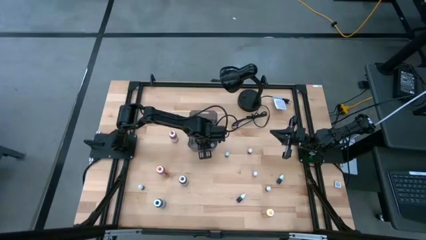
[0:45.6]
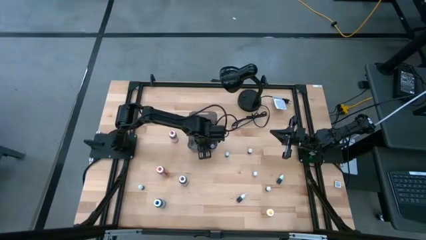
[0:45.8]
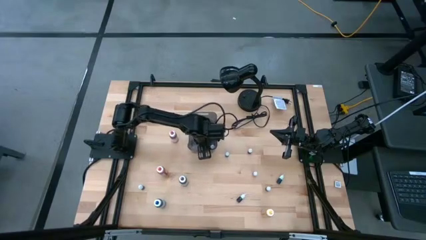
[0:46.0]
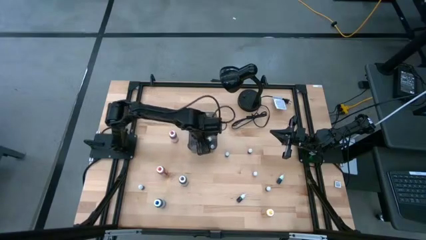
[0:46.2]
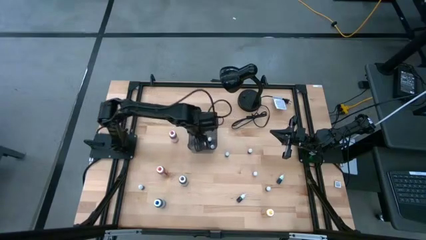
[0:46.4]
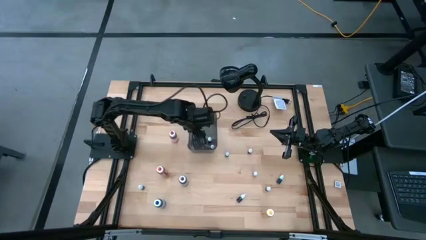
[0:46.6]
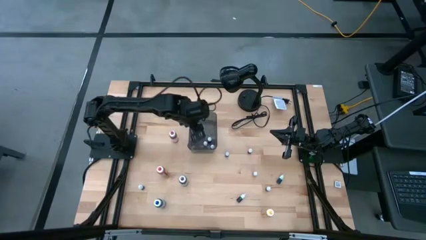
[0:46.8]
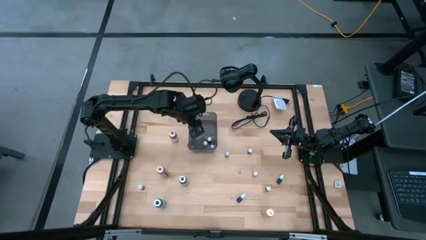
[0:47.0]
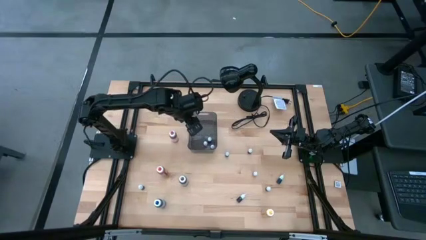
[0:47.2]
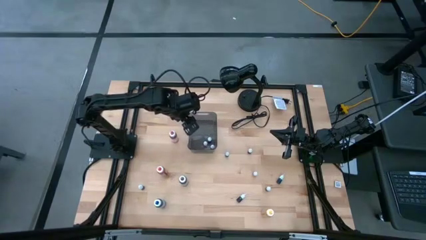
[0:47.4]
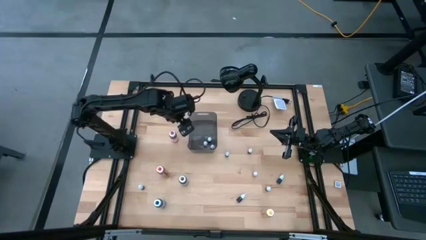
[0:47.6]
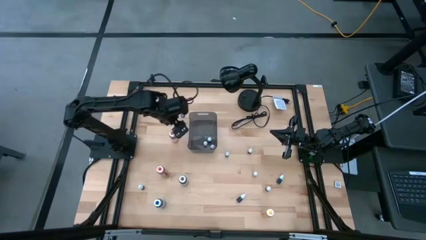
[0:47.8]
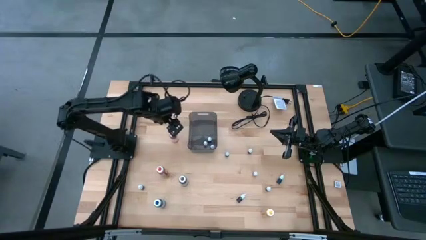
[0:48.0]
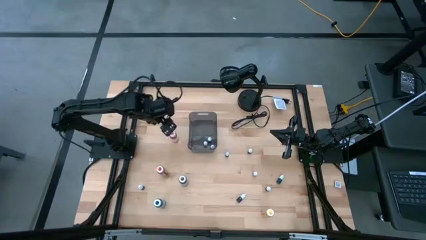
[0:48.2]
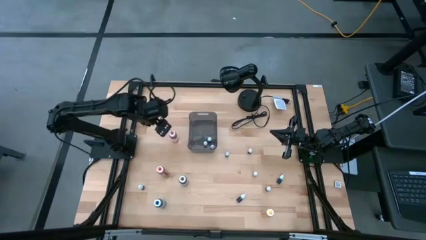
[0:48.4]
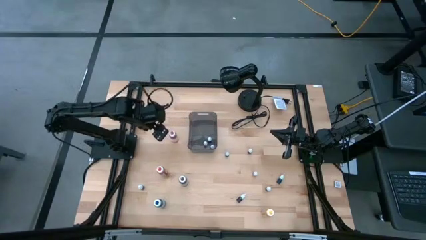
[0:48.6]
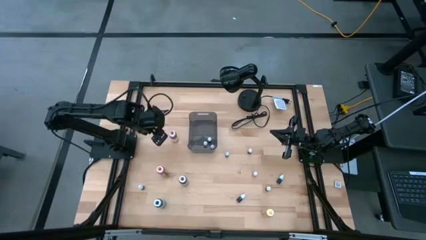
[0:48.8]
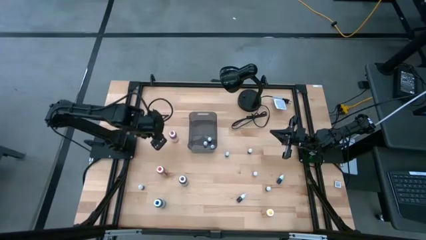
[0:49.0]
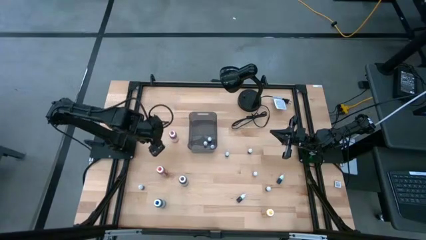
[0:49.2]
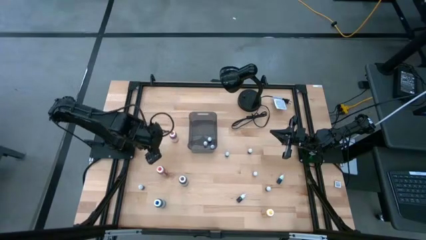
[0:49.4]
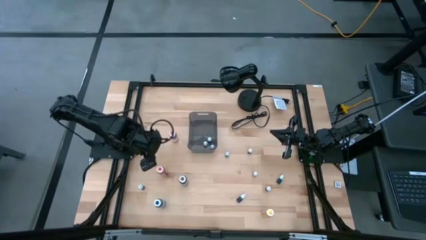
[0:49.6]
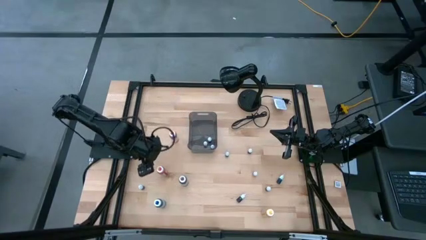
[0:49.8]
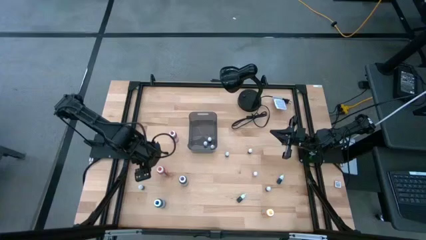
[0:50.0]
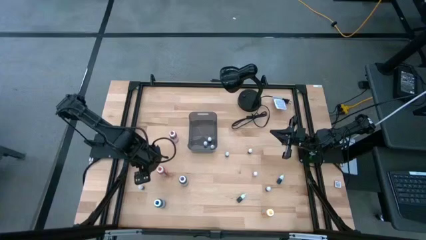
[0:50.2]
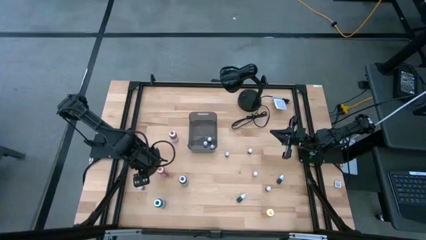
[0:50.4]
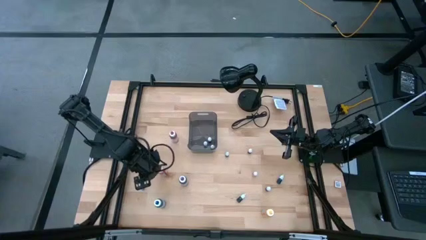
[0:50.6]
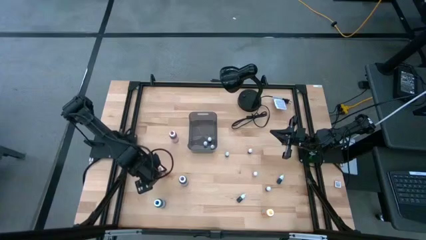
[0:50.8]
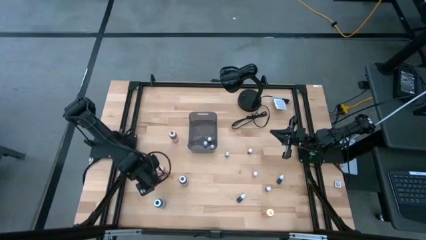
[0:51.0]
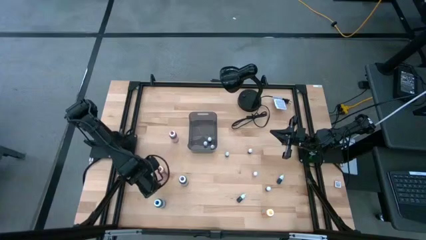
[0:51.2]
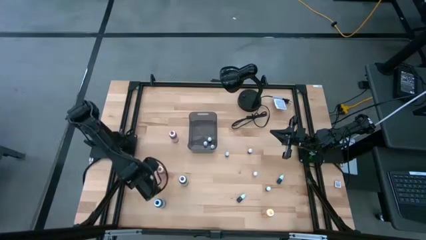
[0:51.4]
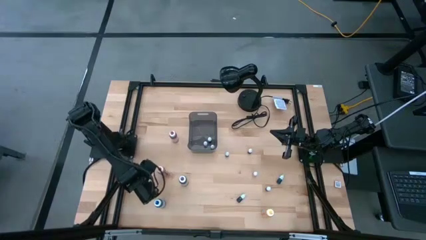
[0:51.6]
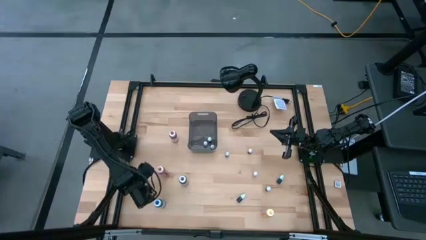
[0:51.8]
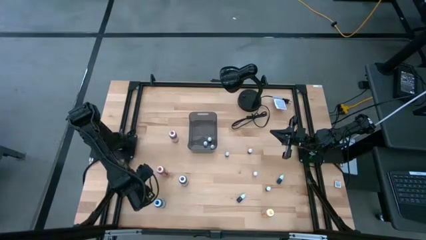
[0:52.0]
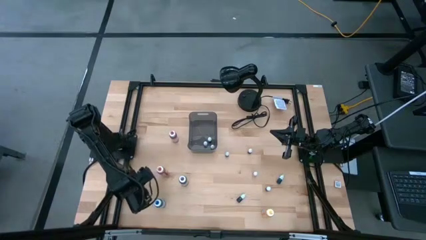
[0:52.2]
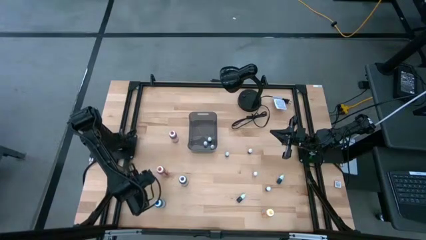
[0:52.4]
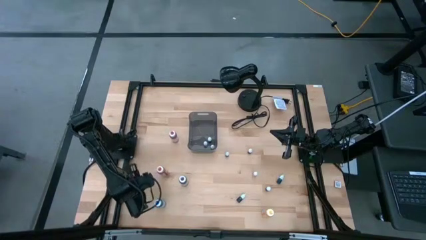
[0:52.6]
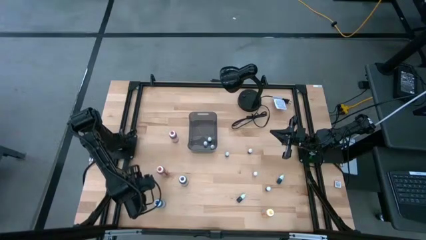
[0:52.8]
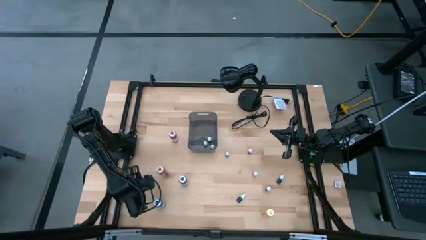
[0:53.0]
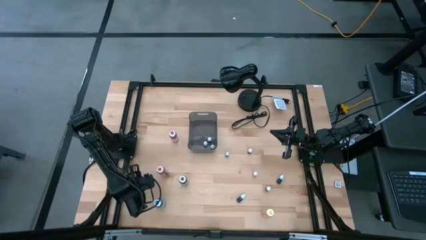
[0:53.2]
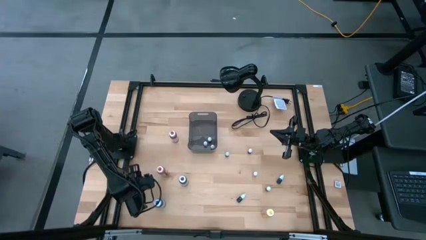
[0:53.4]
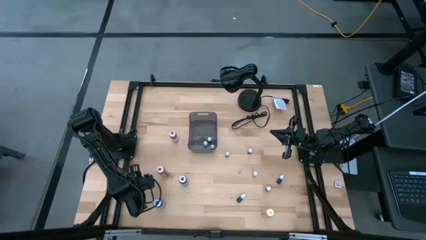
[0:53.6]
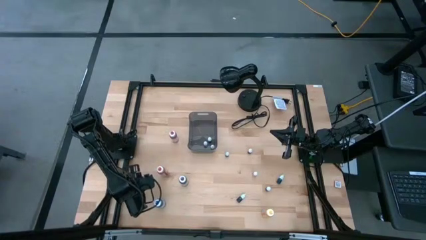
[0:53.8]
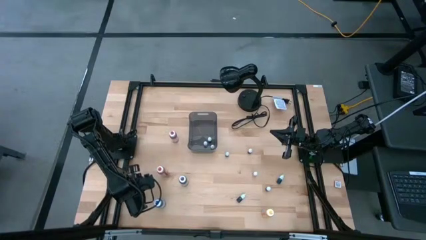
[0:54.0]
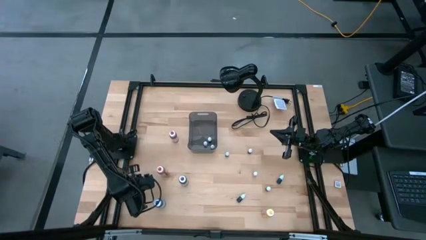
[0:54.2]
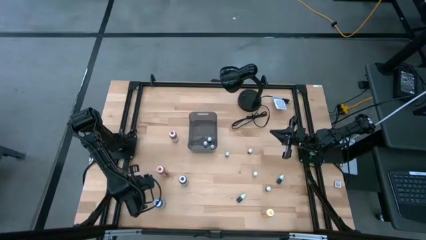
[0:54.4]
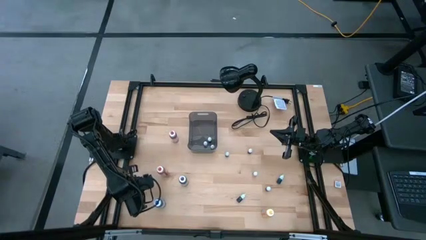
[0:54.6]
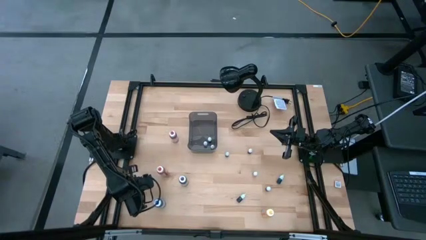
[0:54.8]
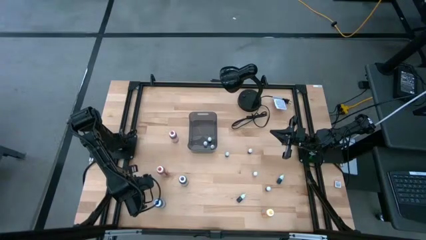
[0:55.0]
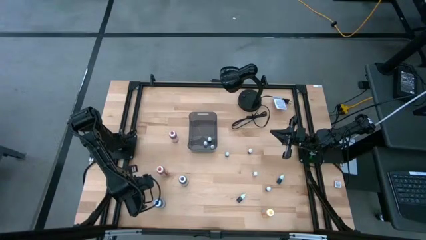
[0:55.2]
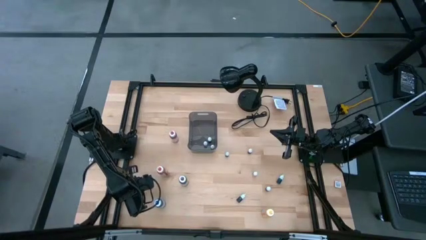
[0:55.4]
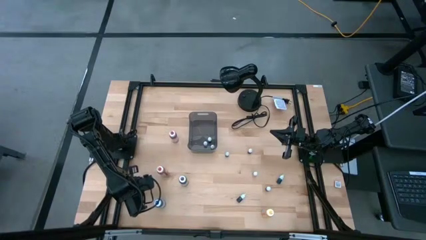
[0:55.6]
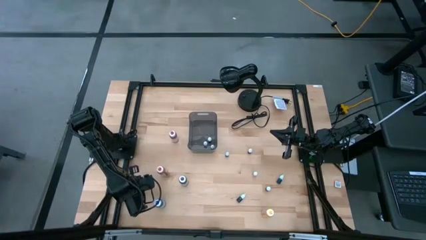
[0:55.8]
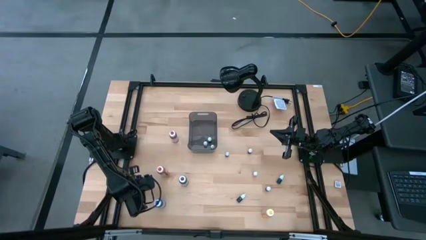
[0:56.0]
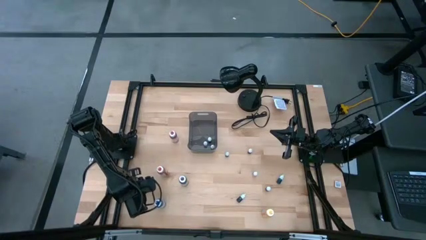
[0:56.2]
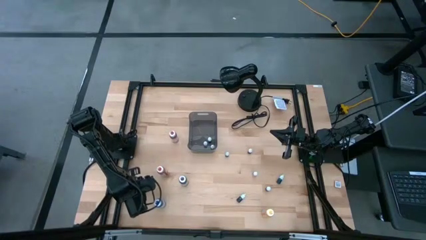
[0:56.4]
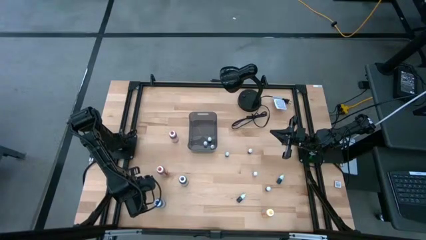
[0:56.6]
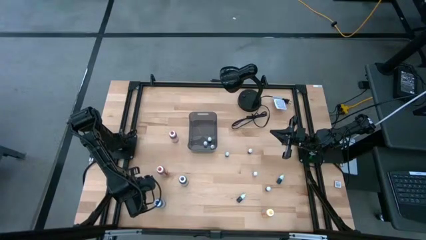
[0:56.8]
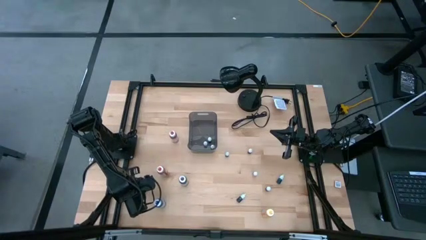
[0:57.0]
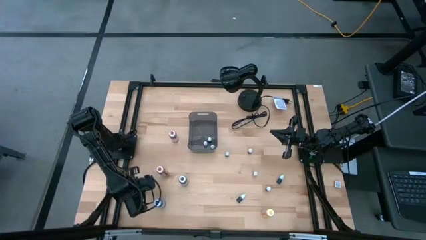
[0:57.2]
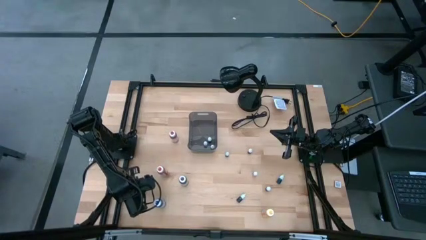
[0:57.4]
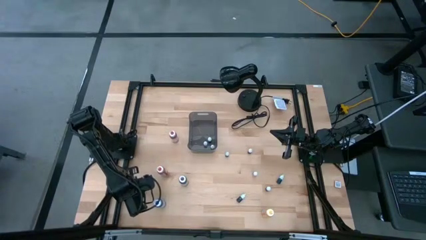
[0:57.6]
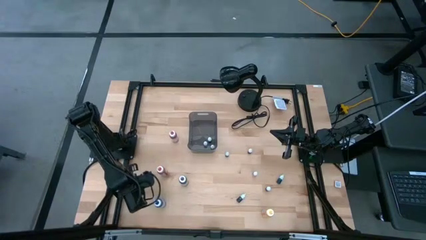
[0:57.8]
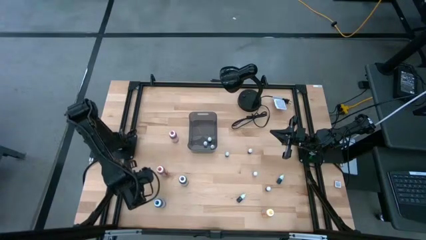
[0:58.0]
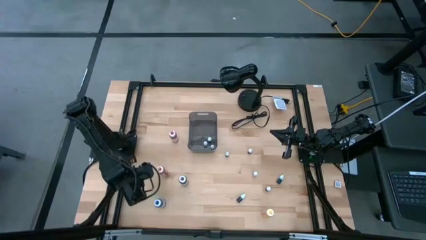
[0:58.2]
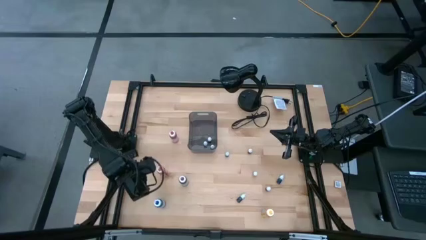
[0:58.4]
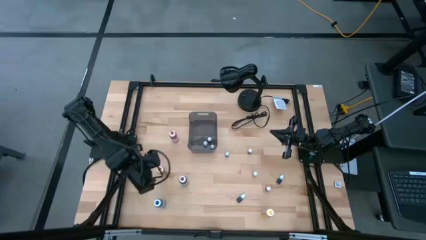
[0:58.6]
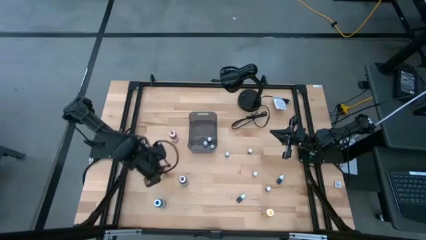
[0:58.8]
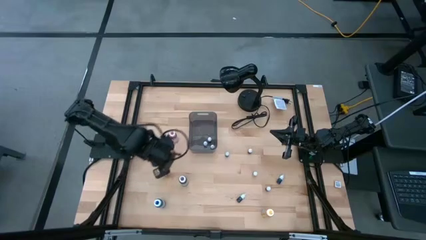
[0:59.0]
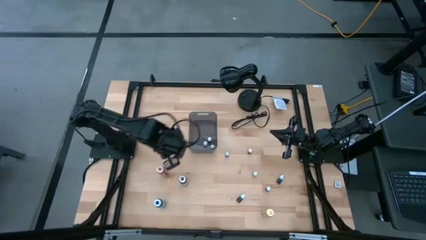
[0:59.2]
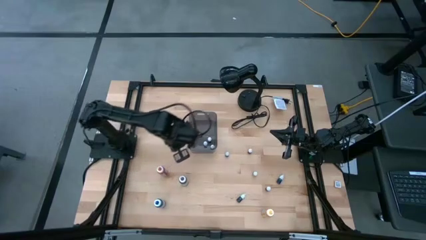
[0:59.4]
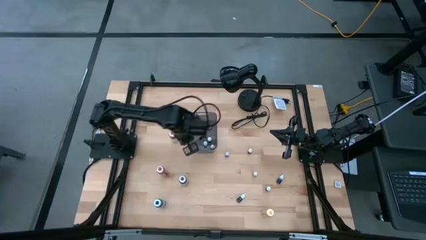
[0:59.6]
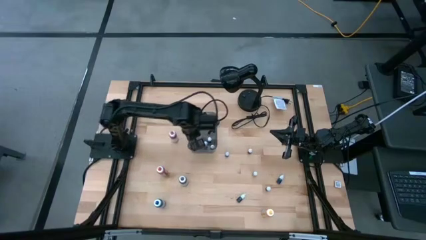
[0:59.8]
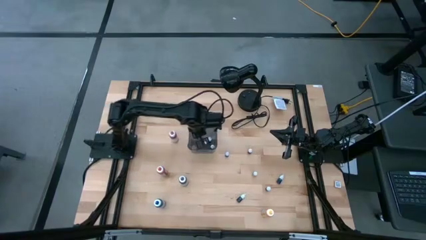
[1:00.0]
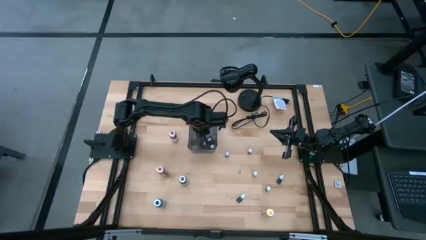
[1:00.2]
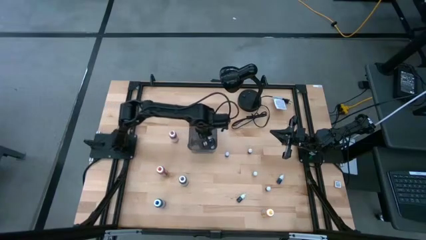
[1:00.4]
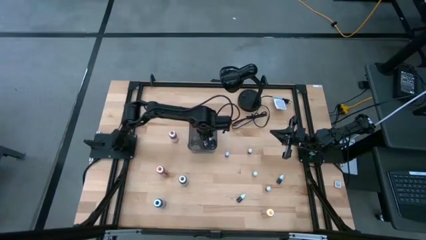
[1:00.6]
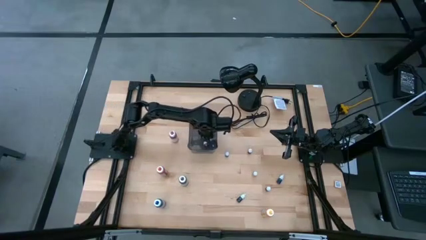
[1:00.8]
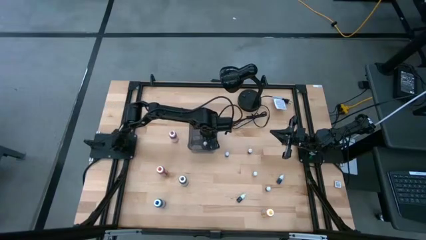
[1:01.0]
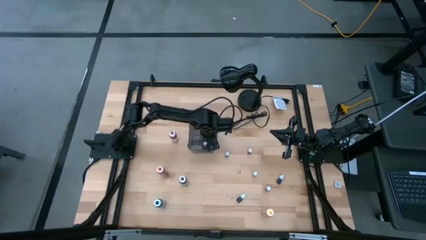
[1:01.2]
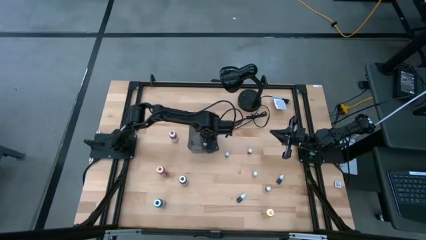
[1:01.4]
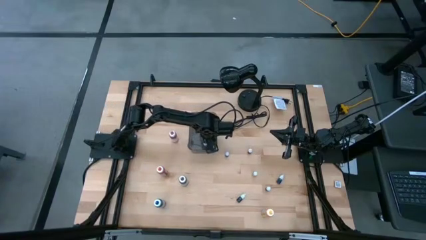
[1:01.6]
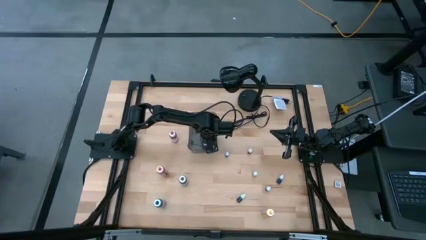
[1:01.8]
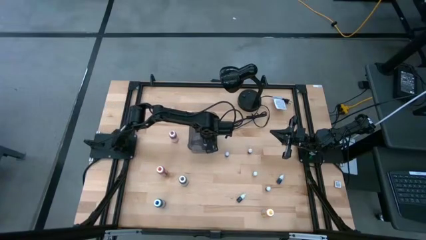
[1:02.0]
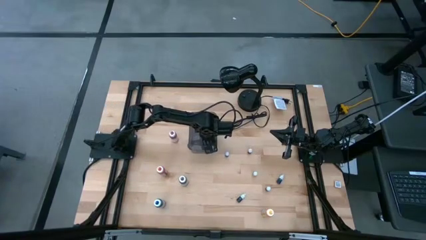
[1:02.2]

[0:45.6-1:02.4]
Task: Pick & Place food coloring
Put the left small red food coloring bottle into the gray transparent bin
